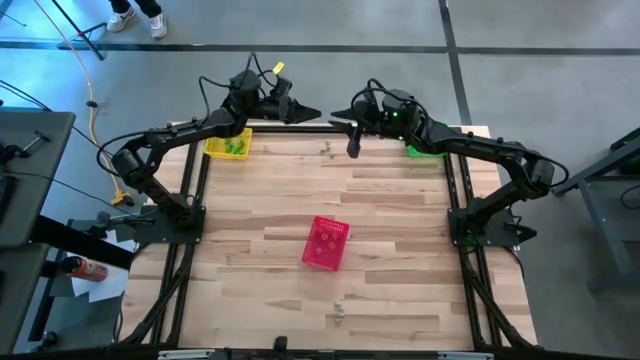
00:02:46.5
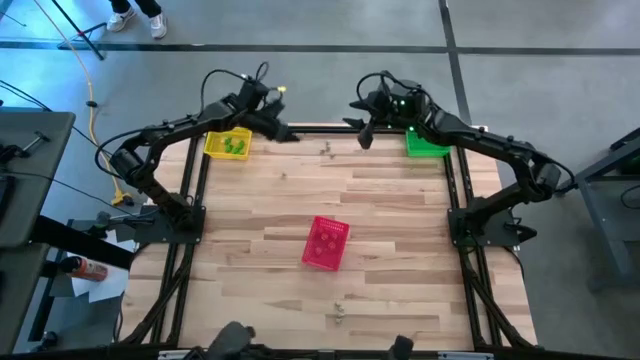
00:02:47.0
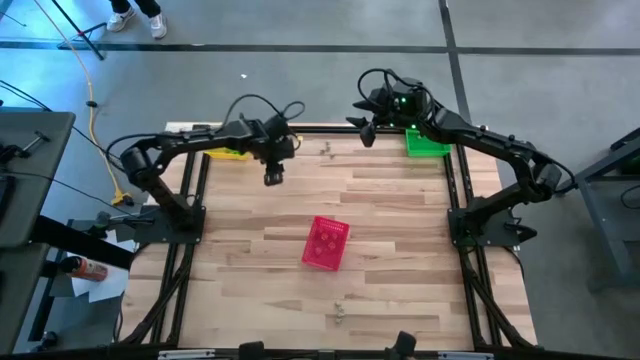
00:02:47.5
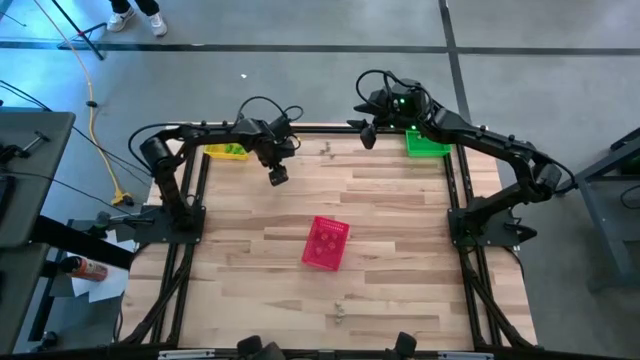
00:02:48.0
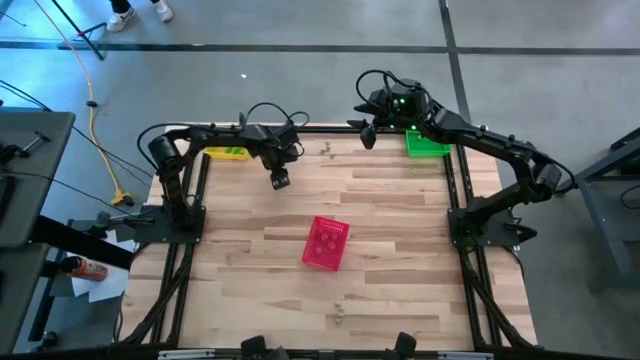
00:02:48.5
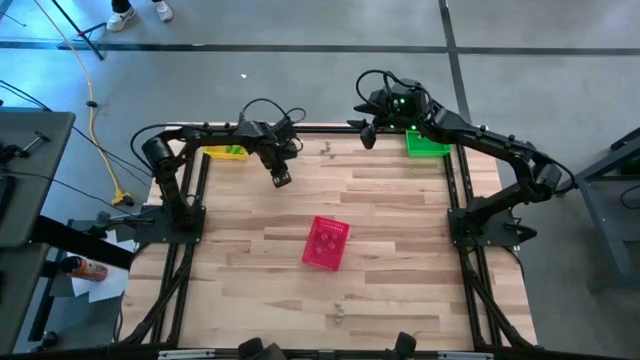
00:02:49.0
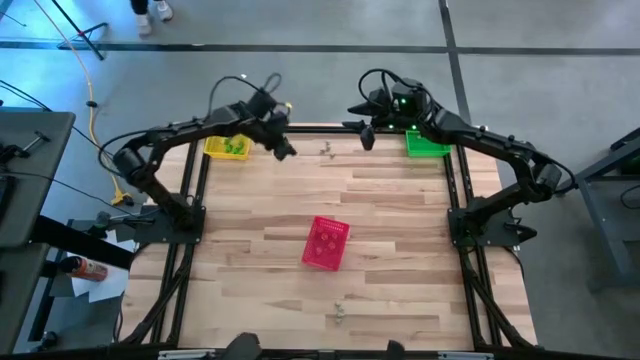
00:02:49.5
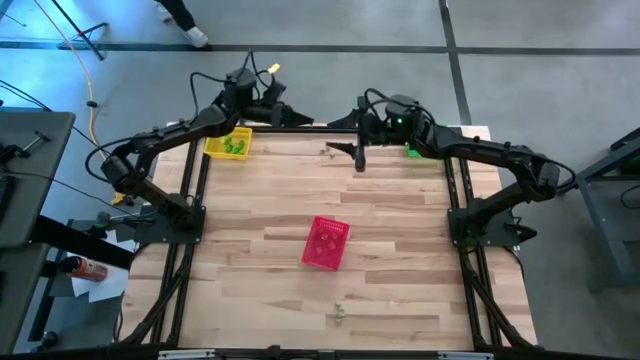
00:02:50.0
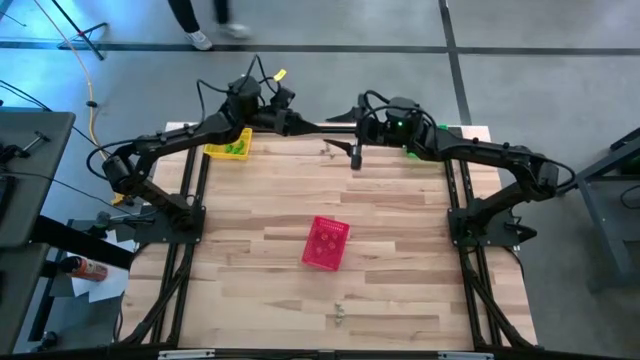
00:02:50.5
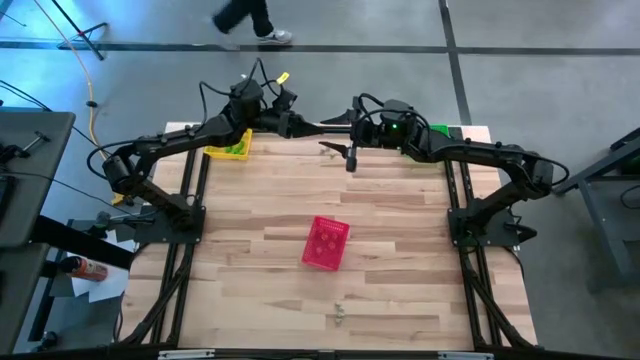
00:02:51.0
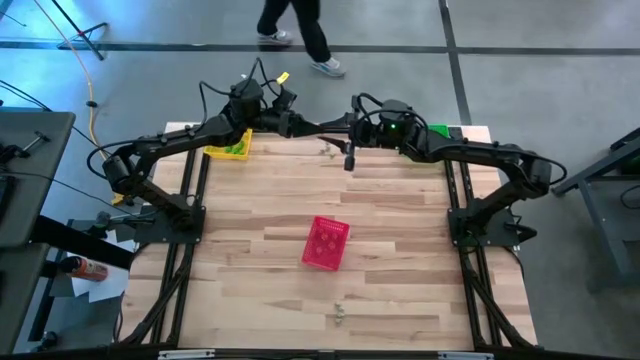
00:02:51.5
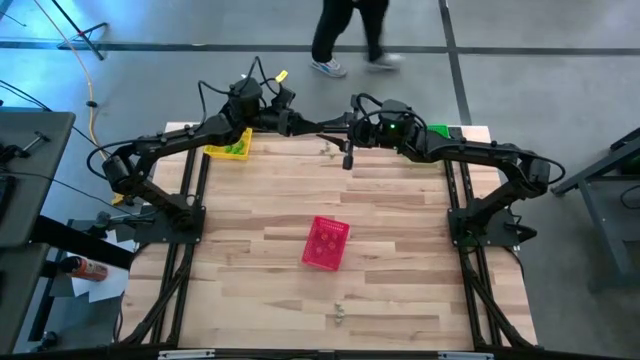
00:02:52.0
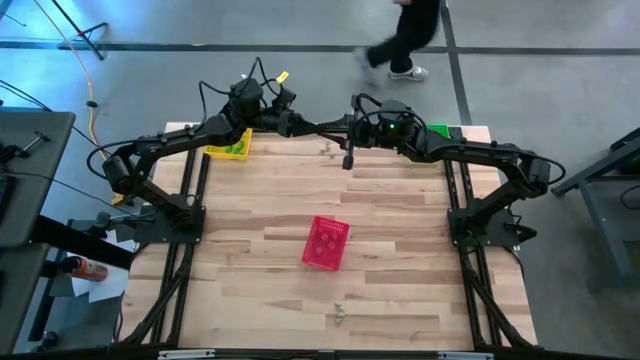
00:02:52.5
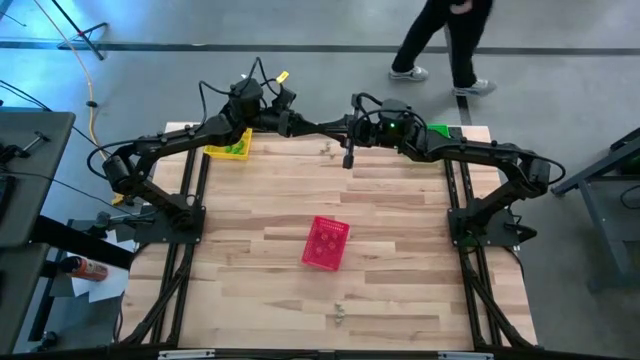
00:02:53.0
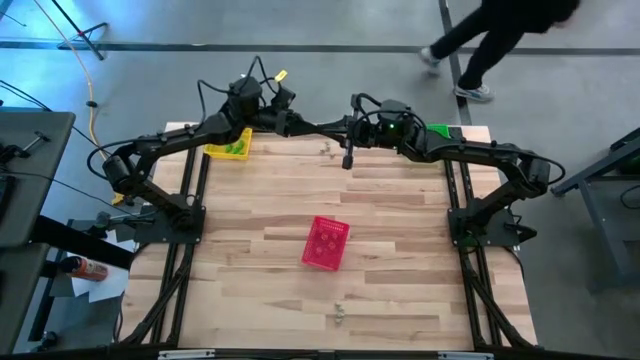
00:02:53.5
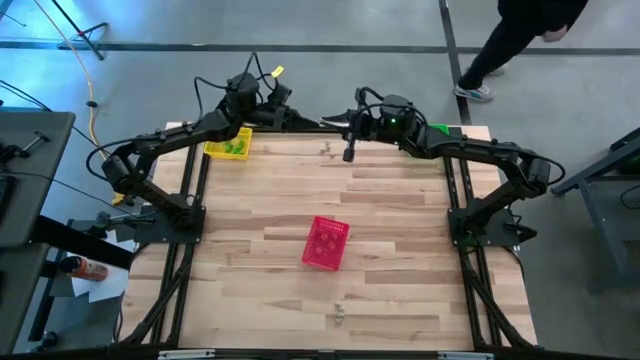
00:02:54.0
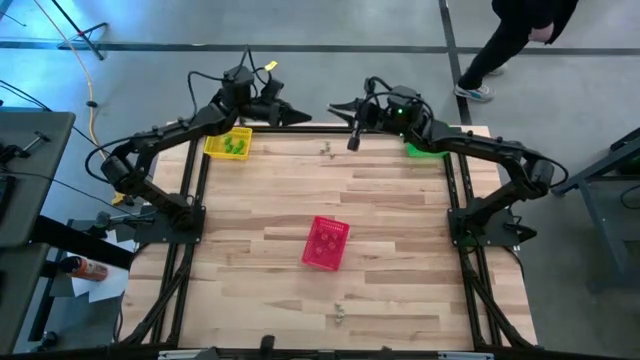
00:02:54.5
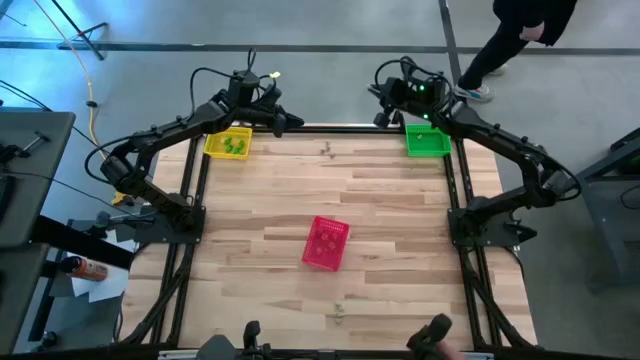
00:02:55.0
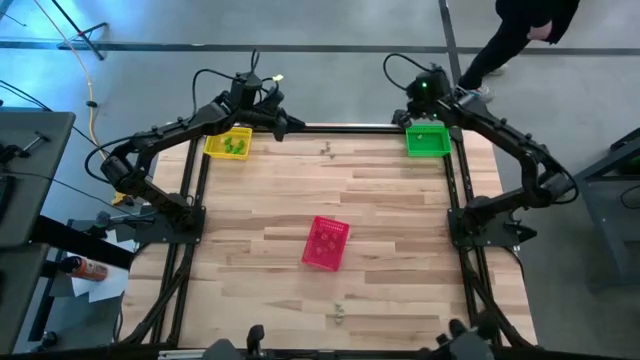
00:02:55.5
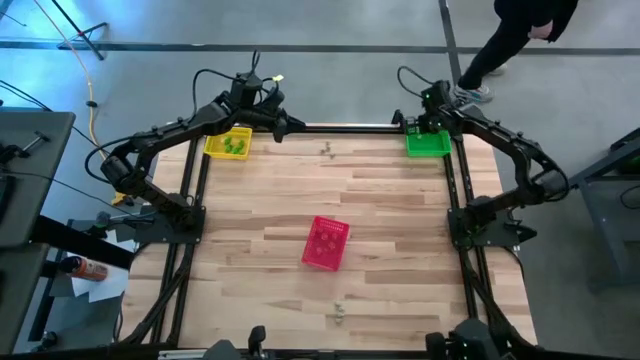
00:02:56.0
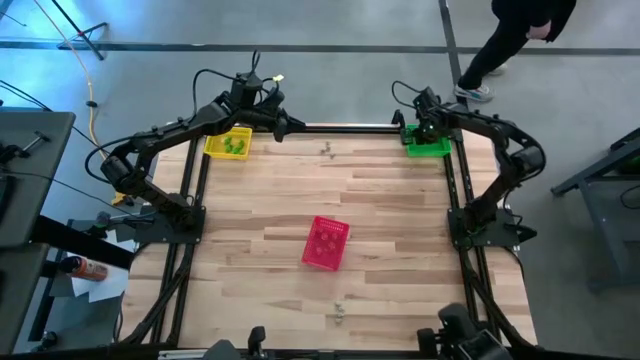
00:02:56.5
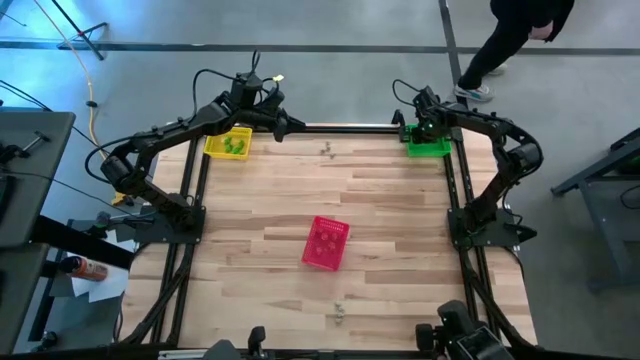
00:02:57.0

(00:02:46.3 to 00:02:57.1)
Task: Sort Halloween decoration
Put the white skull toy into the green bin

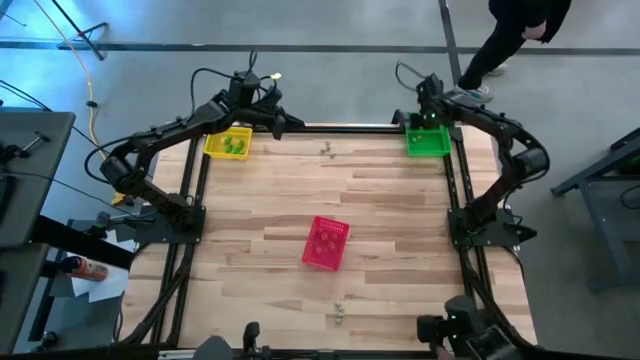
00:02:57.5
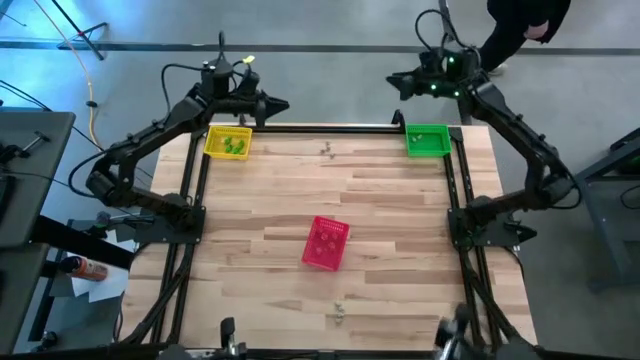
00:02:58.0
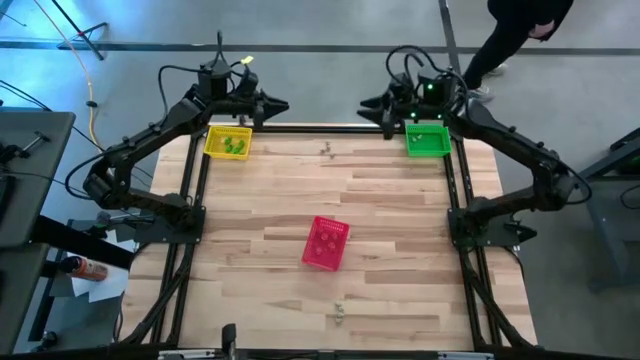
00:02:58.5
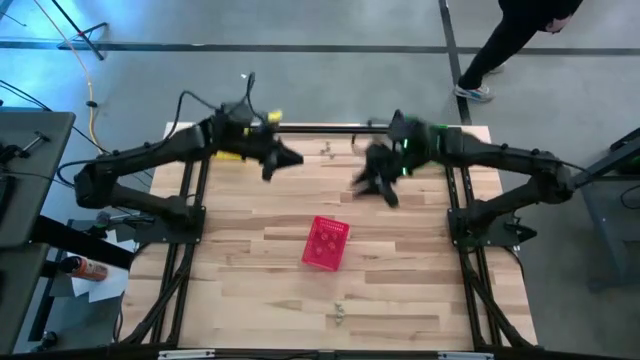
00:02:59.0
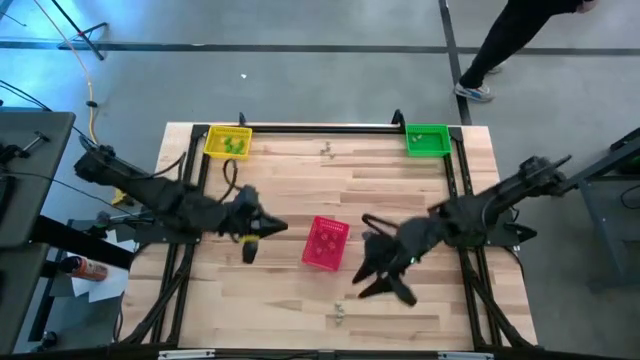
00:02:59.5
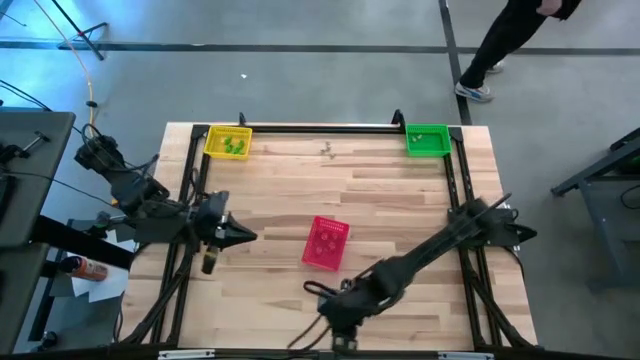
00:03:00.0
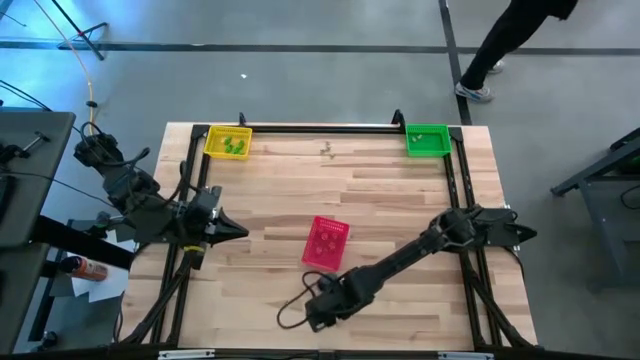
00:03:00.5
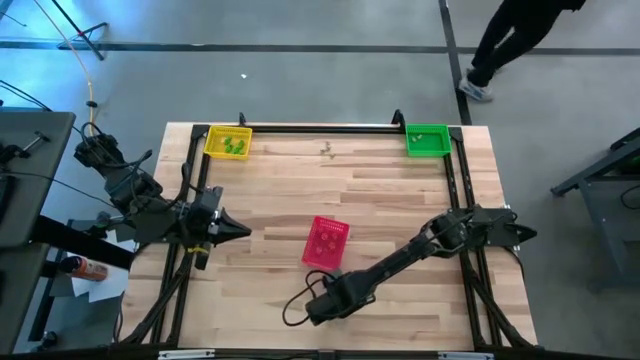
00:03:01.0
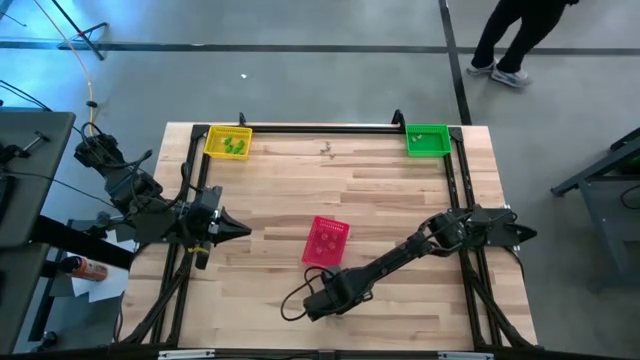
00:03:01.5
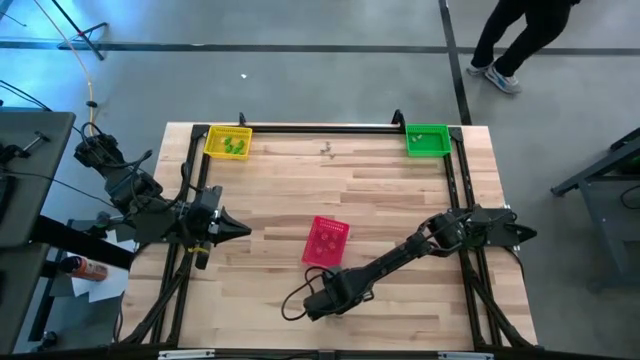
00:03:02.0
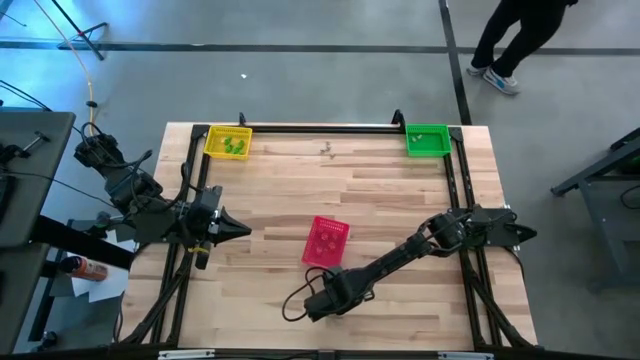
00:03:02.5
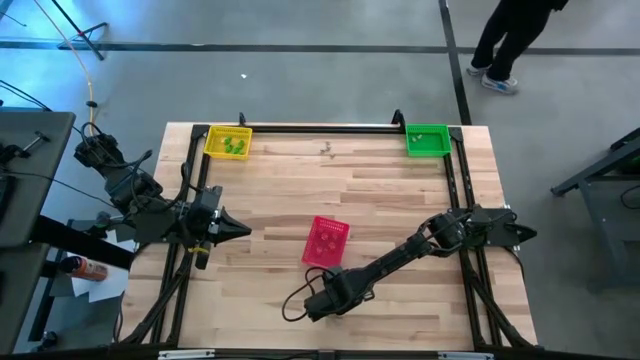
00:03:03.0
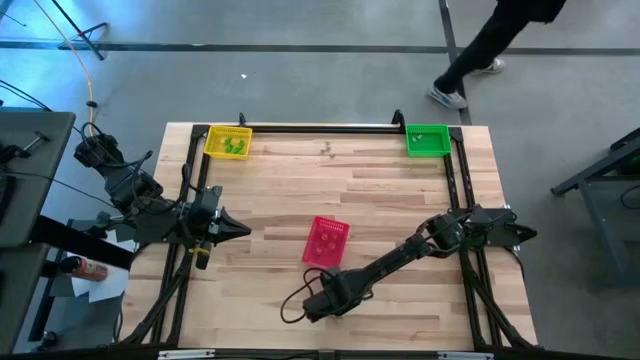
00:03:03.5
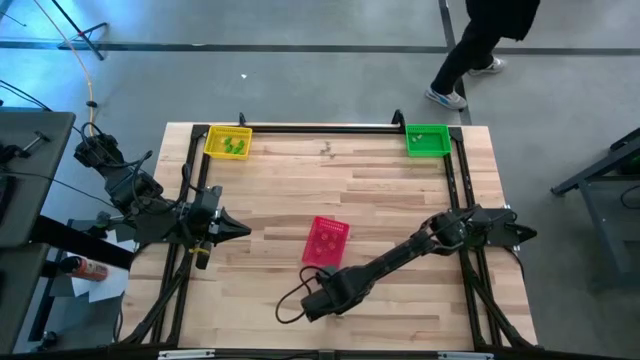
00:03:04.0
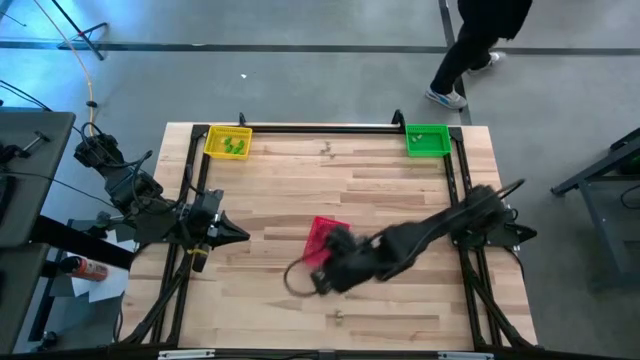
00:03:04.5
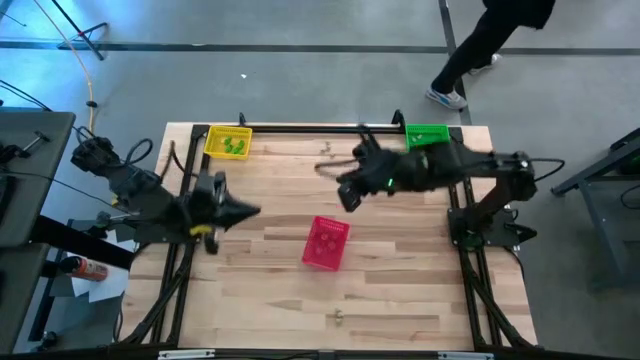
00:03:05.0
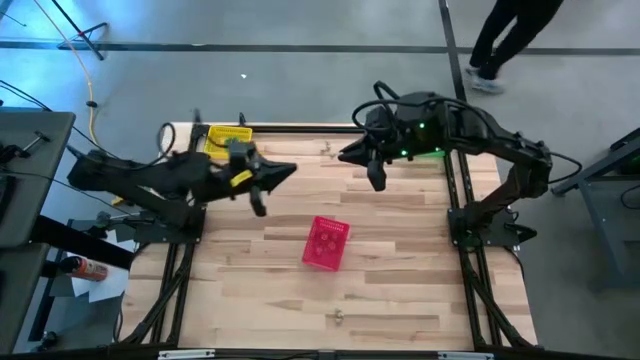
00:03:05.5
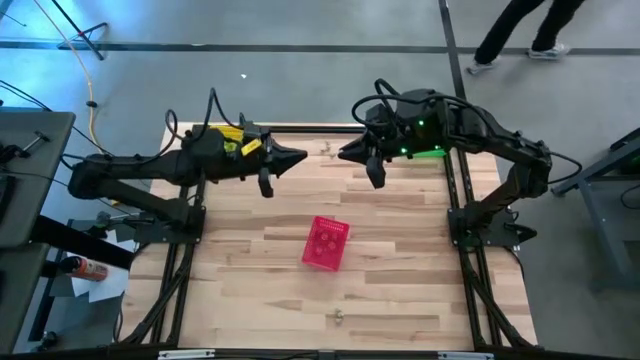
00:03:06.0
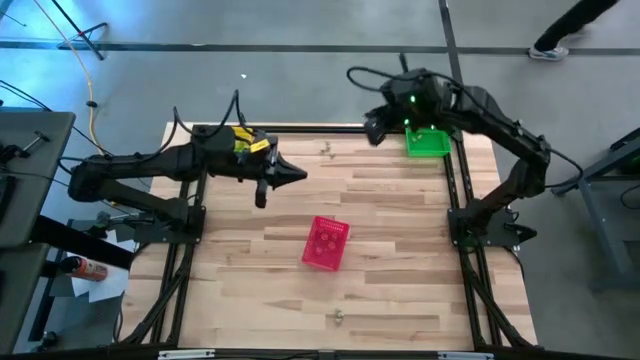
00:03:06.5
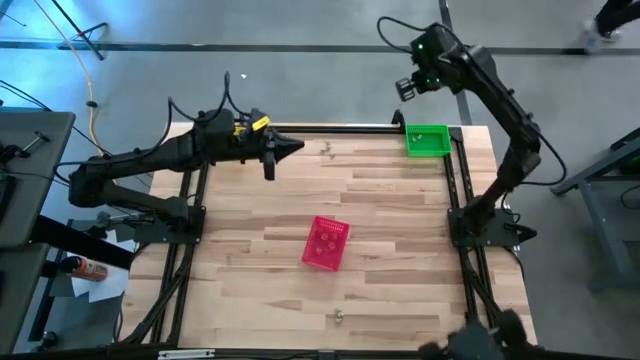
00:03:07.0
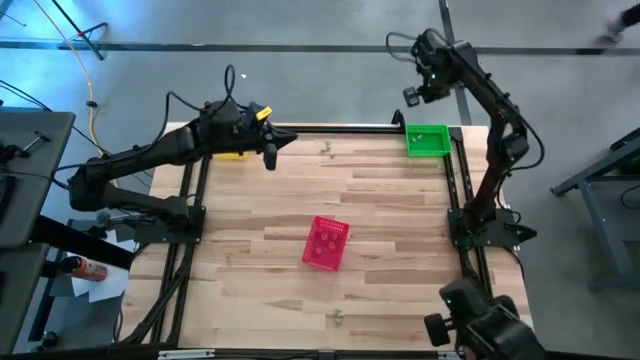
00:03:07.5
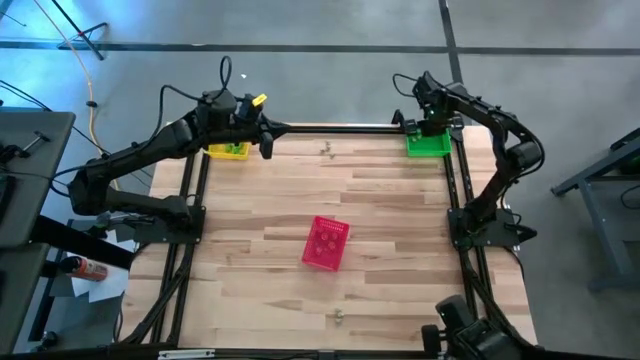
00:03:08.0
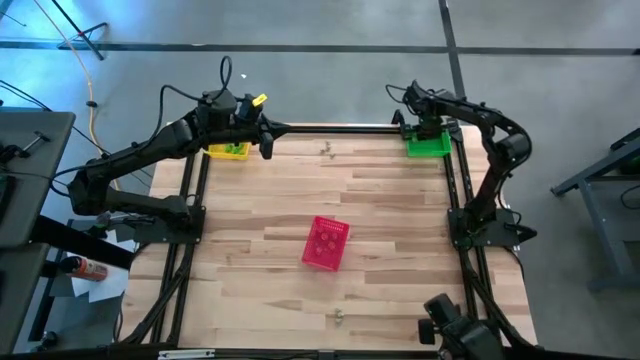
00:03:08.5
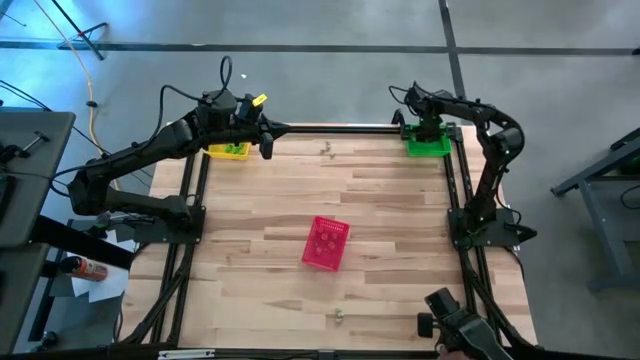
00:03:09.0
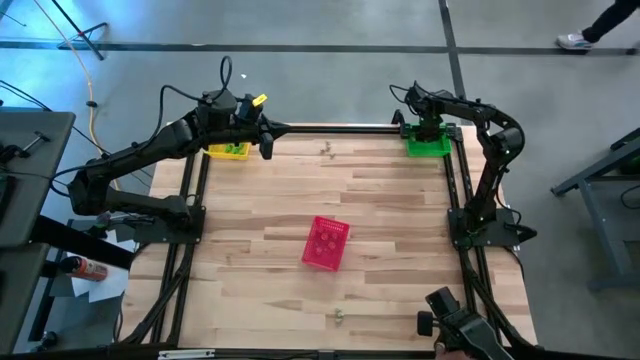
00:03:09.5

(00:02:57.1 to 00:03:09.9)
Put the white skull toy into the green bin
